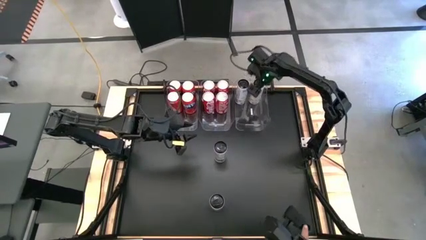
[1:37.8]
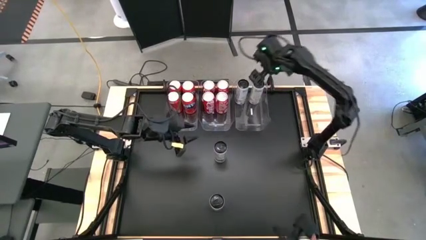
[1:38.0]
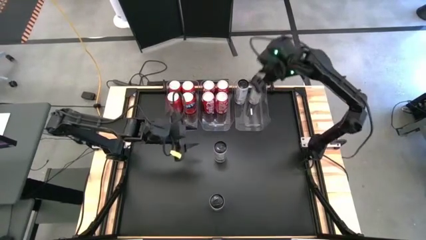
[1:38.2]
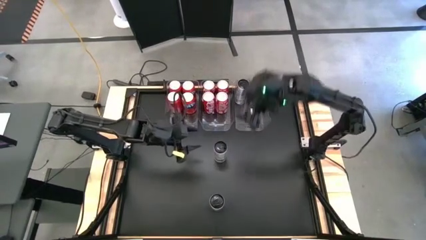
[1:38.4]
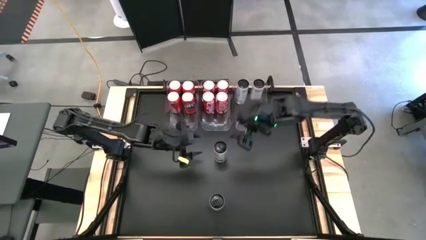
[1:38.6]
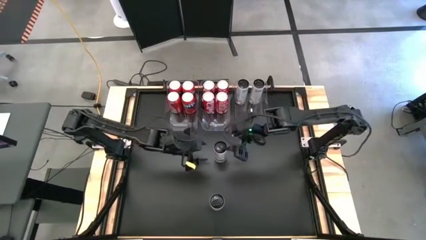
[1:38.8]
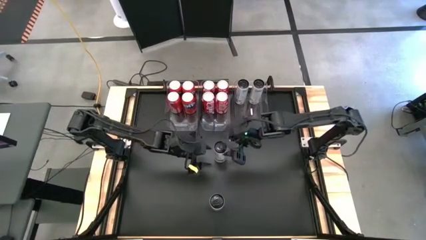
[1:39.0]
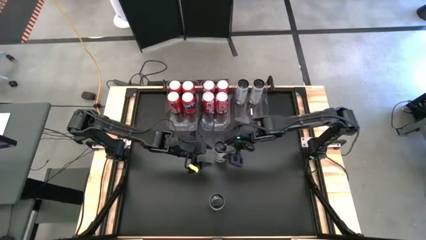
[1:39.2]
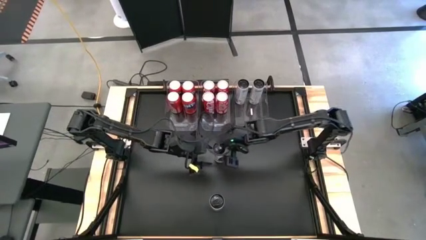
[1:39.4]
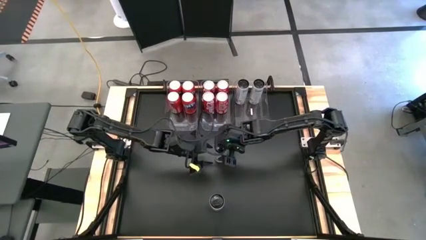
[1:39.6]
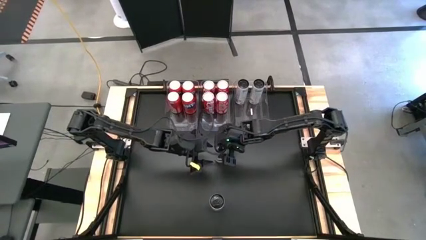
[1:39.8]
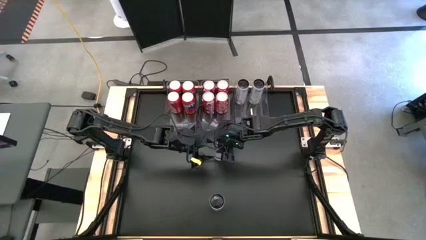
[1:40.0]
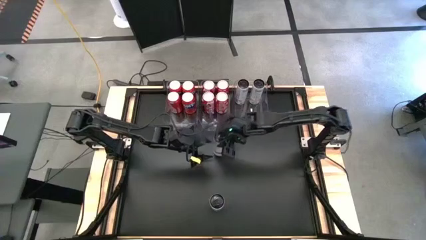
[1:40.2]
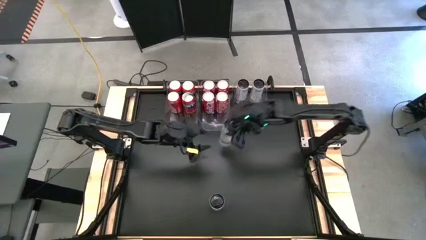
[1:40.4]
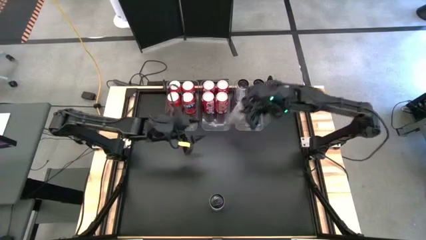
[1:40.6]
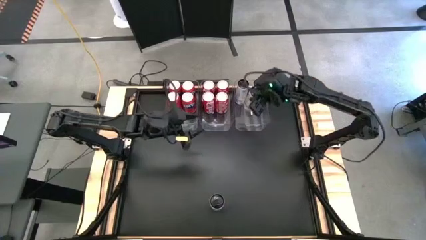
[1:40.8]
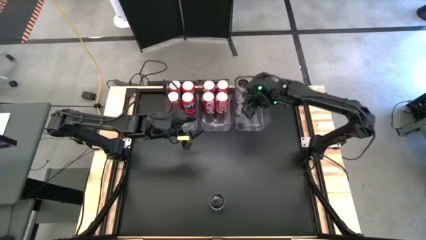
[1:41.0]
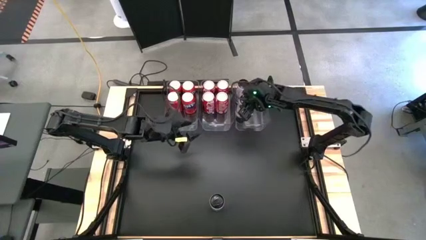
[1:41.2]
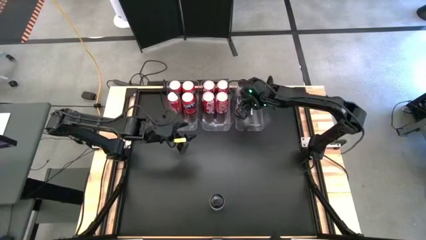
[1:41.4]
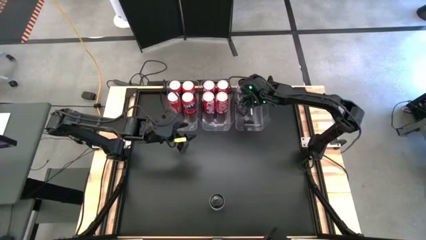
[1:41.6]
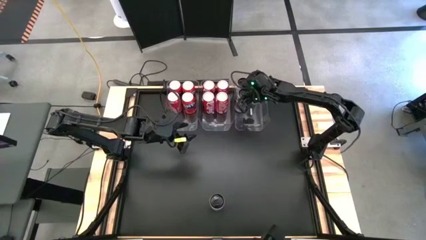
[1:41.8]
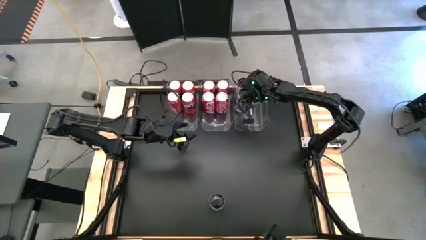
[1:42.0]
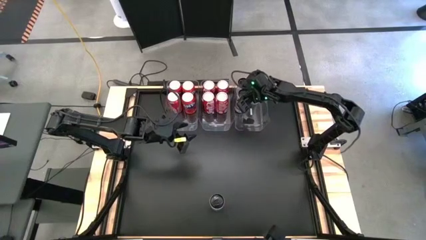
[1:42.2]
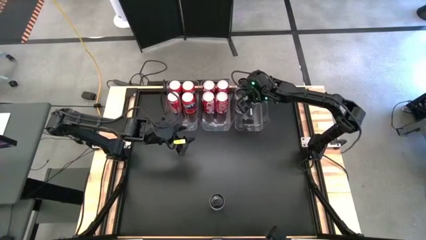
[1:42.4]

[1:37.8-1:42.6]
Task: Sort soda cans
Put the top white yellow soda can into the right transparent bin

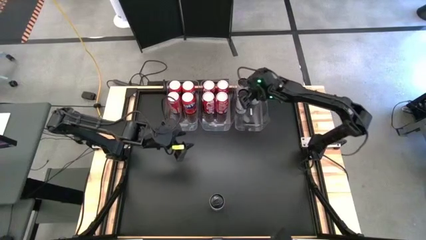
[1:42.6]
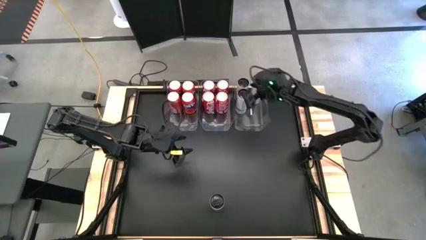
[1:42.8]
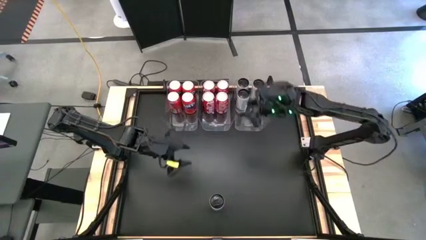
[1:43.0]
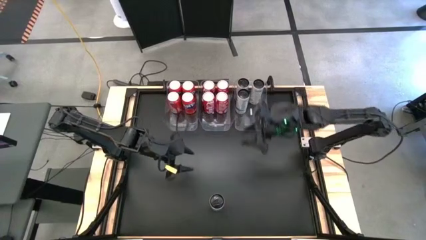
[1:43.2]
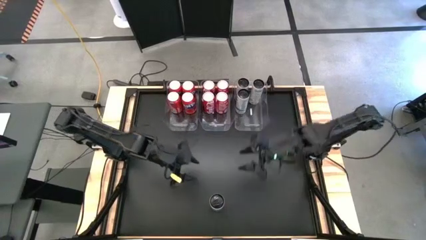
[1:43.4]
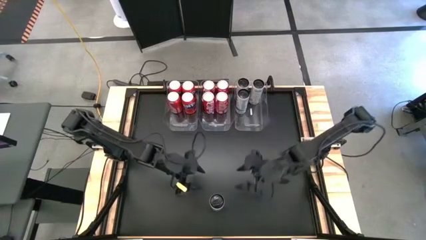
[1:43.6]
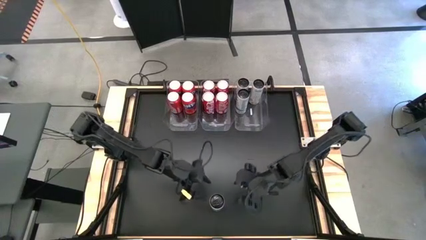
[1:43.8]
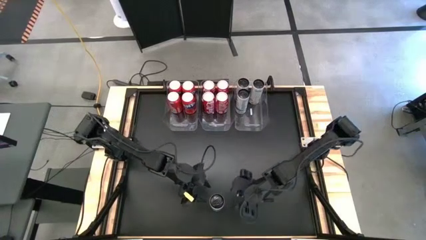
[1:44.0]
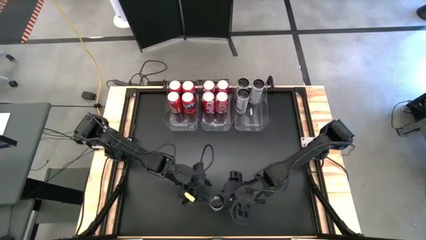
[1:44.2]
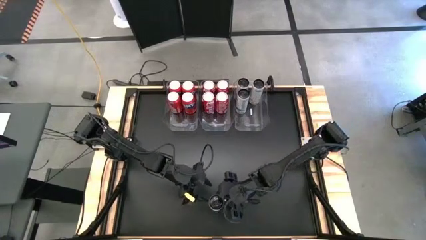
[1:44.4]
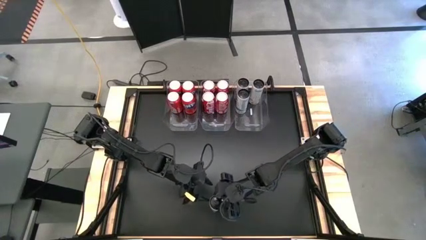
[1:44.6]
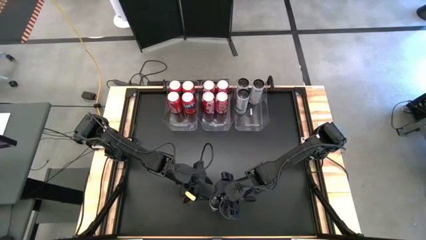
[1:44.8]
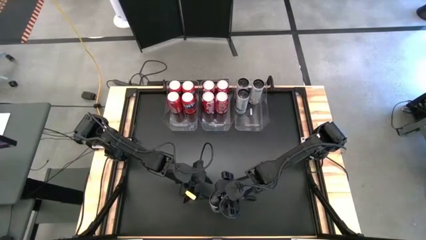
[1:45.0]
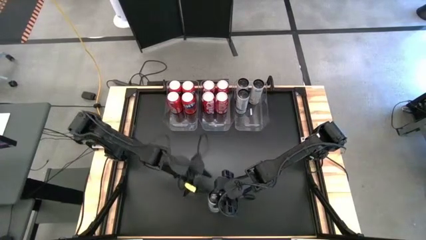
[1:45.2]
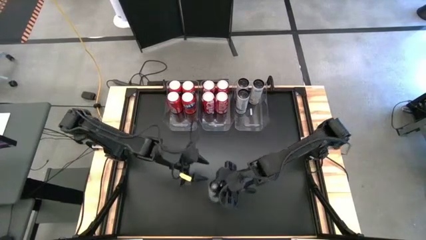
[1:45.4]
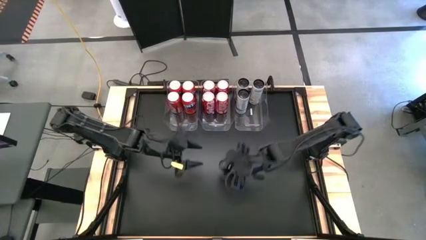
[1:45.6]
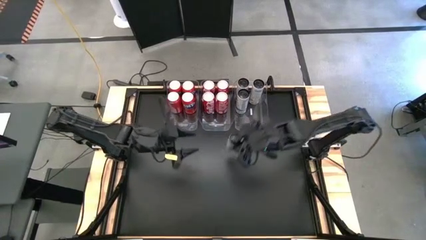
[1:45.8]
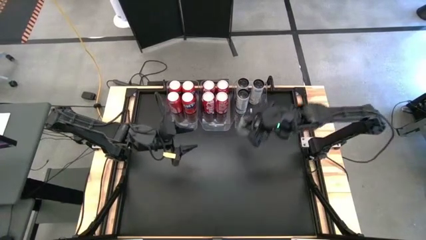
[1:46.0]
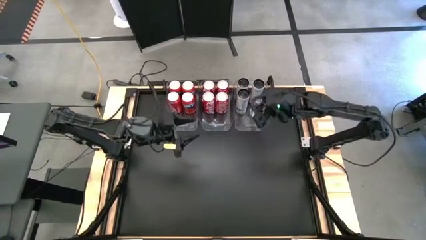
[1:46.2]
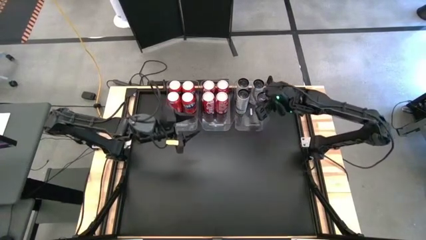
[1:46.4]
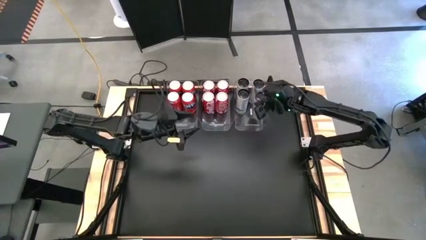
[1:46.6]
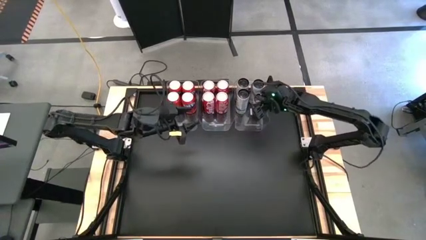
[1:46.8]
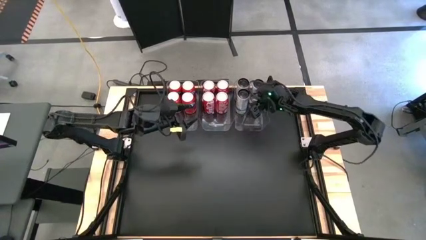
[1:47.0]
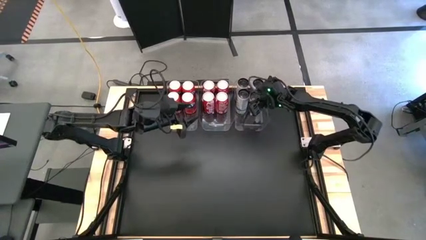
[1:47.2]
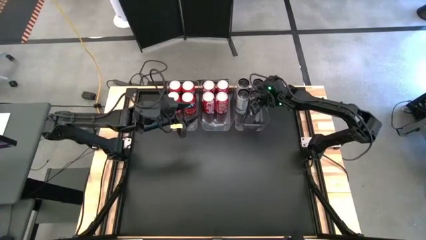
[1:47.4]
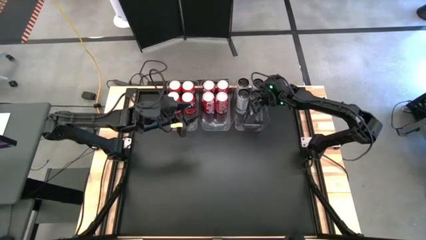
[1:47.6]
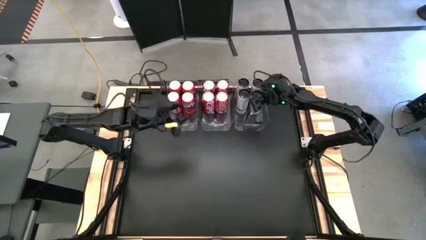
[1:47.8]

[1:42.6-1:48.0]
Put the white yellow soda can into the right transparent bin

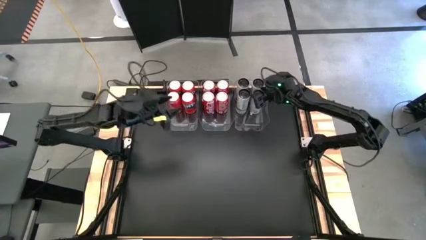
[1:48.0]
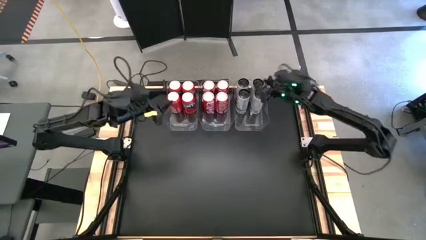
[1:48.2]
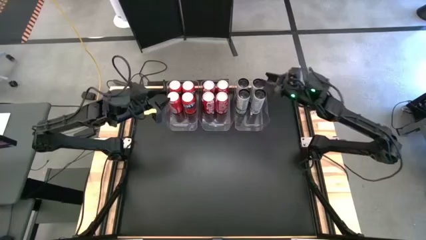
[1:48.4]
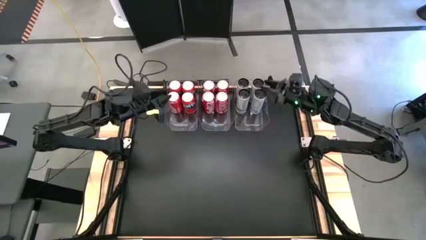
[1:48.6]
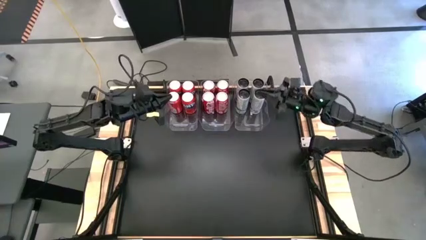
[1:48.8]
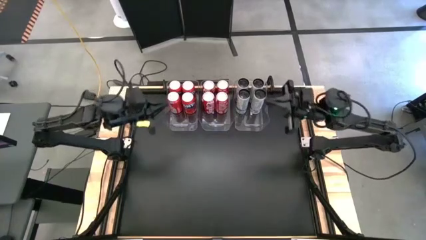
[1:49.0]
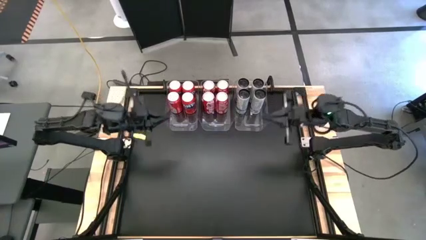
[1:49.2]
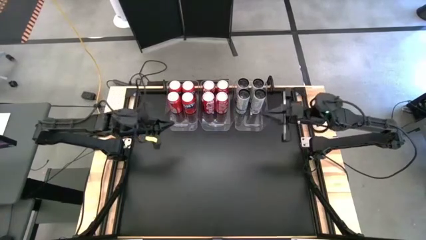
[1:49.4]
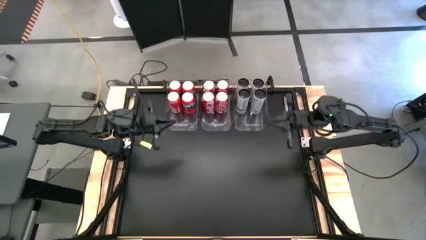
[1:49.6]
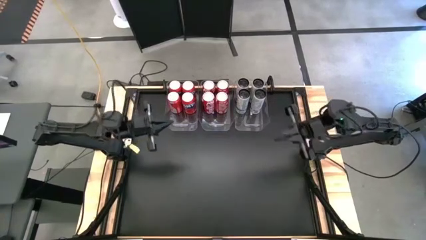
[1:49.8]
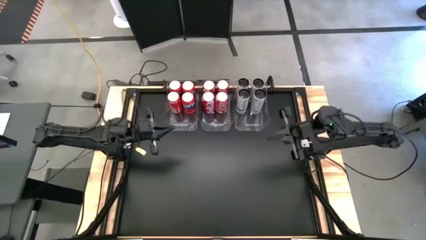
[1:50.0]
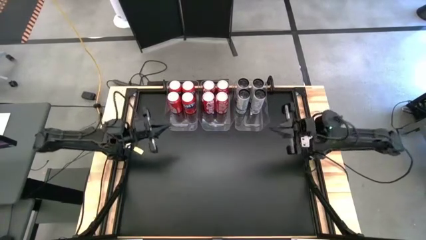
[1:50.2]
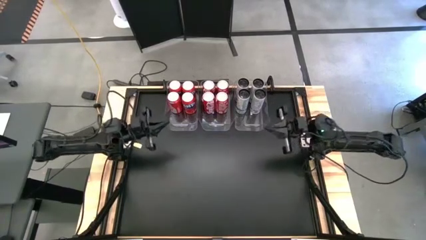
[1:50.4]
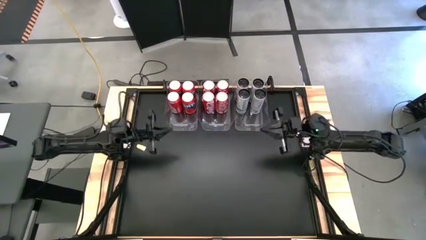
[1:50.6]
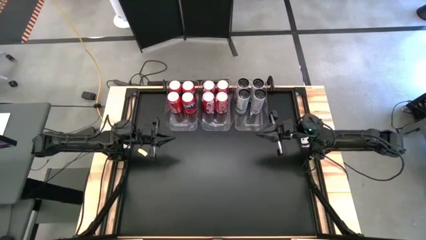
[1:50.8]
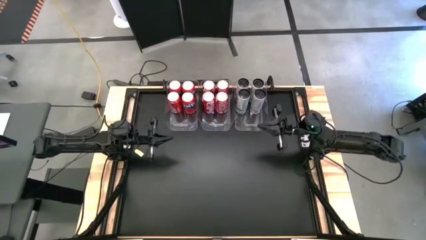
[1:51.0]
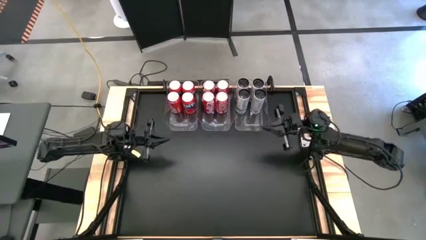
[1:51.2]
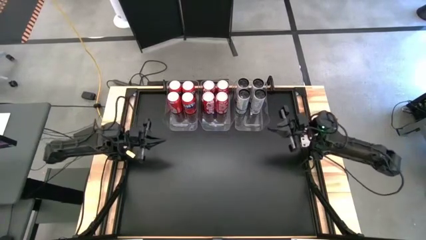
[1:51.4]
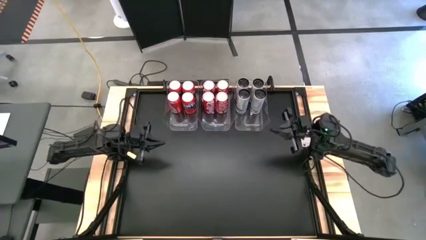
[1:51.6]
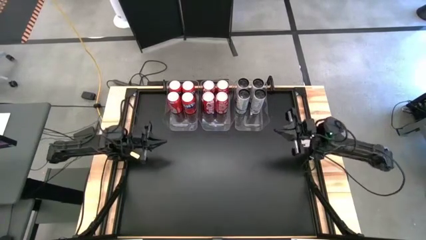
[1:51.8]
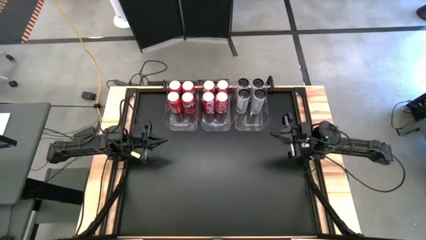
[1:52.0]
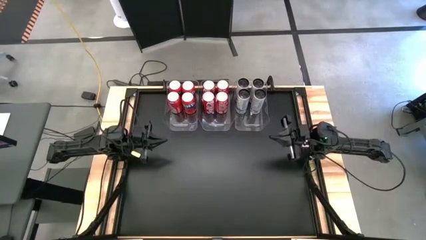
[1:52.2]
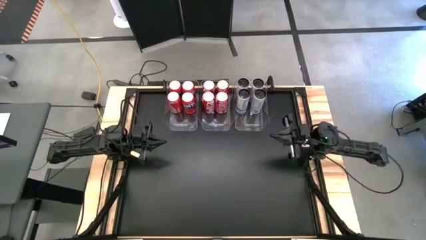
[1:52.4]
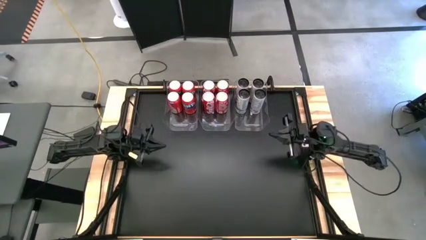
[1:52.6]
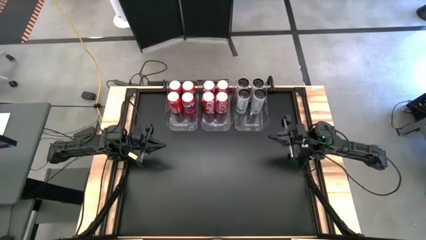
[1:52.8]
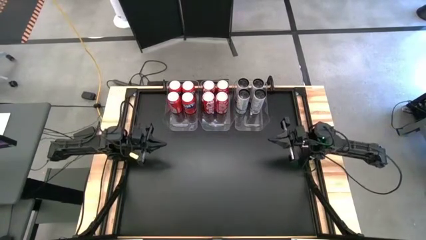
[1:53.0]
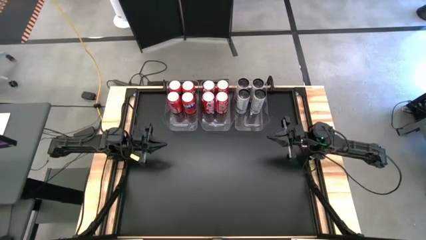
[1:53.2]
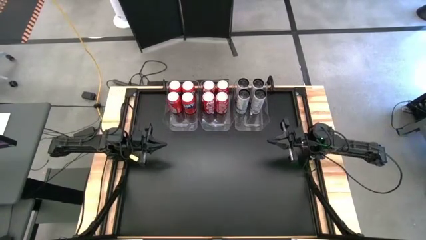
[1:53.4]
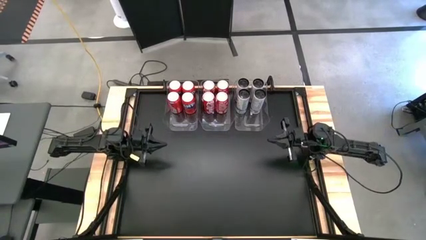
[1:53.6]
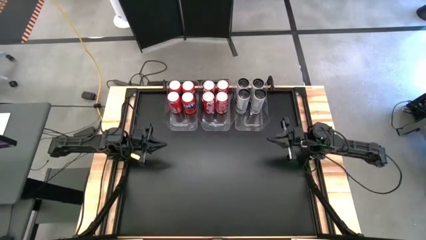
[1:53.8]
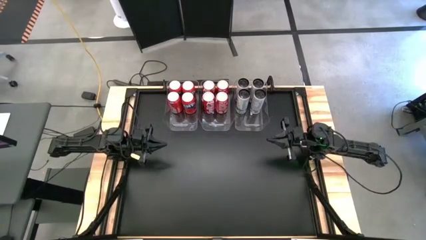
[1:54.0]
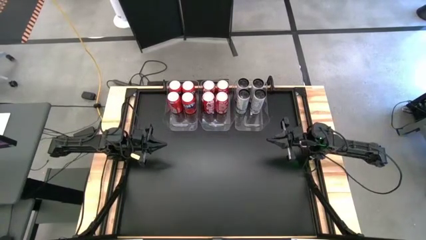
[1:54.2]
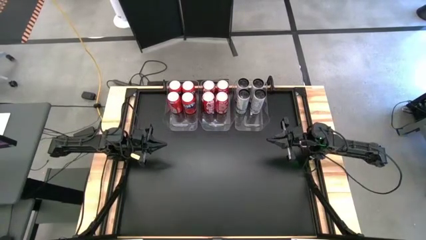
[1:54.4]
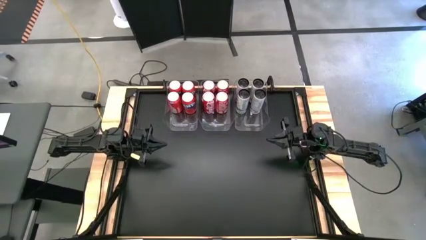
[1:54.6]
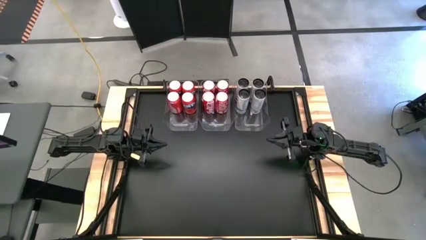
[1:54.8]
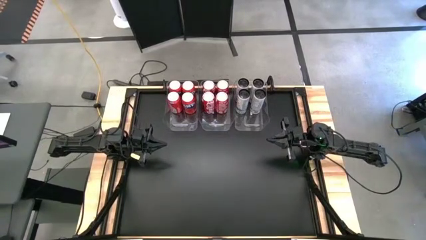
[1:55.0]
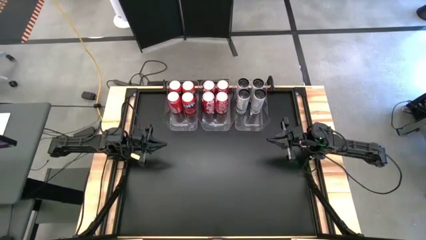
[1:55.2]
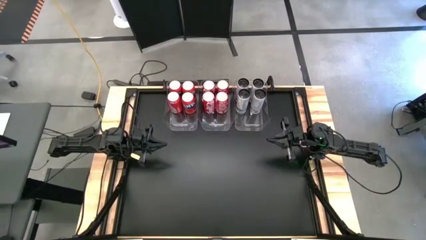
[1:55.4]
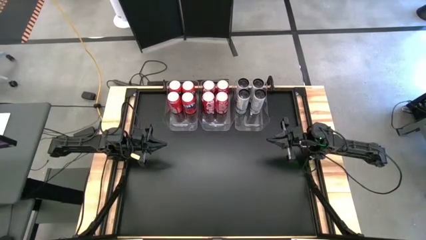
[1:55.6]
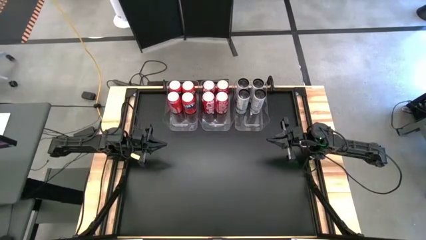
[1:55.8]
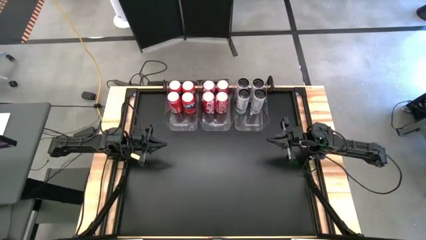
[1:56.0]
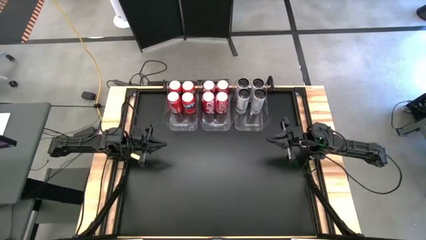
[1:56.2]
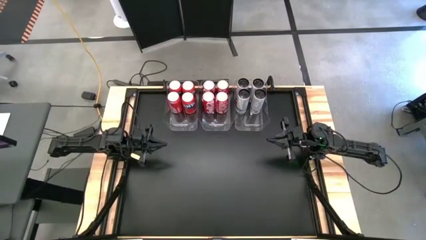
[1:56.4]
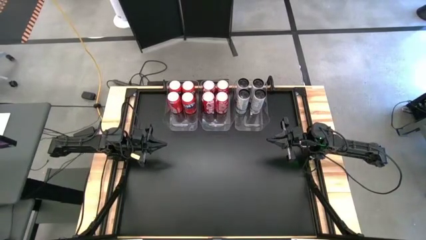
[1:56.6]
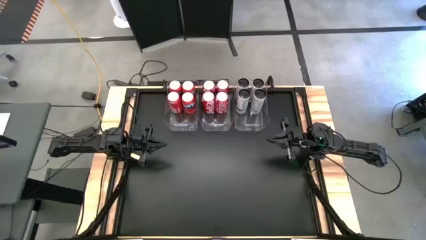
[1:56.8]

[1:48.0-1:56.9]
Return to Home Position
